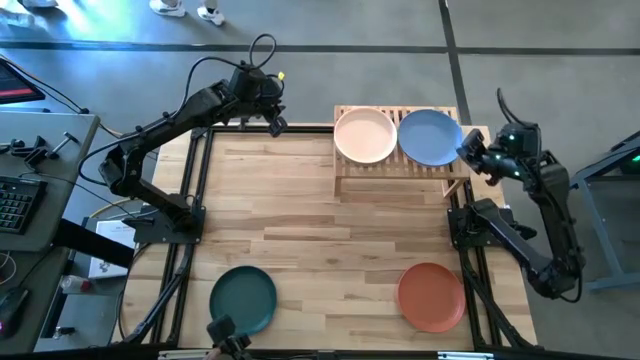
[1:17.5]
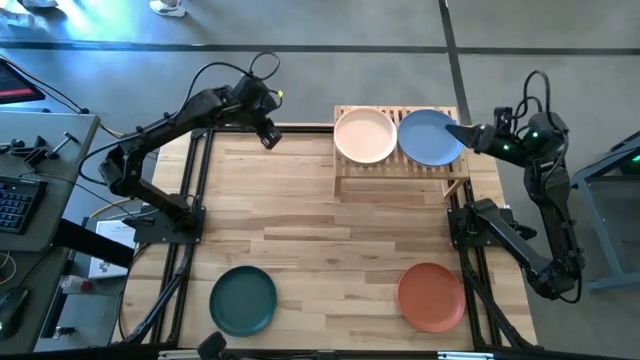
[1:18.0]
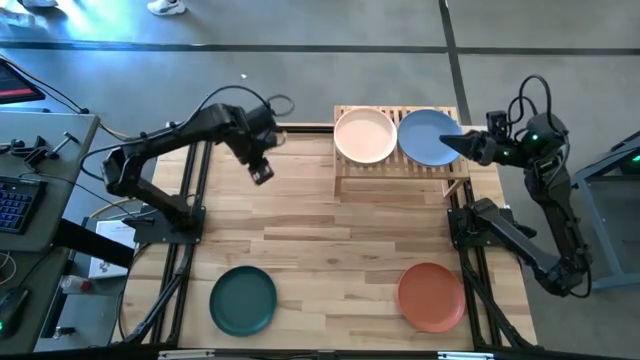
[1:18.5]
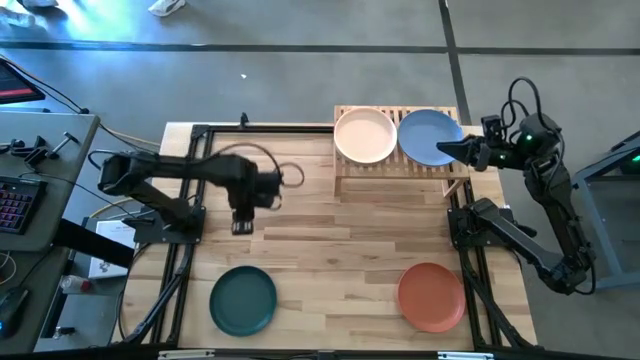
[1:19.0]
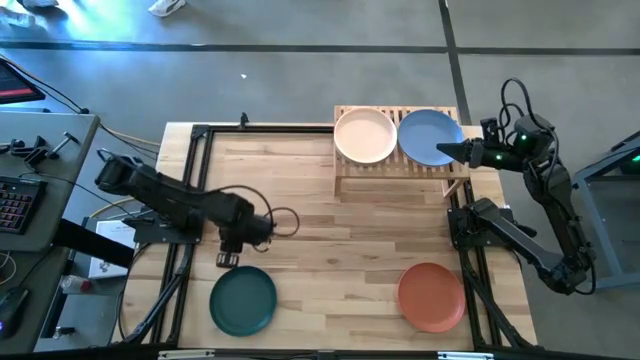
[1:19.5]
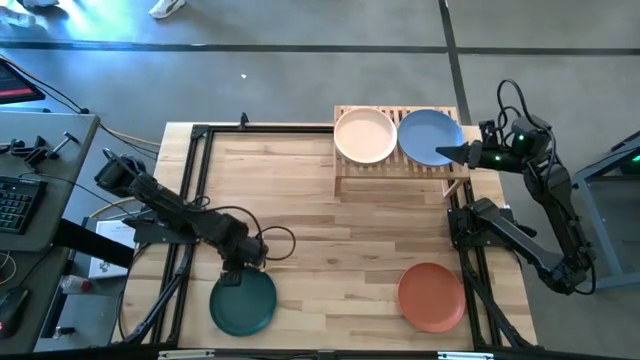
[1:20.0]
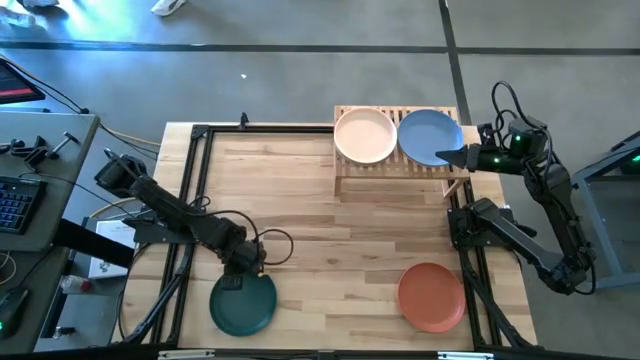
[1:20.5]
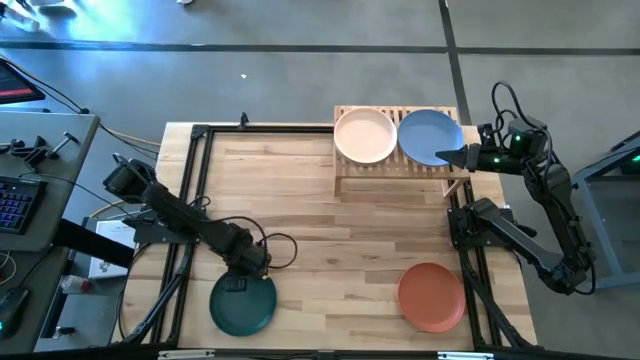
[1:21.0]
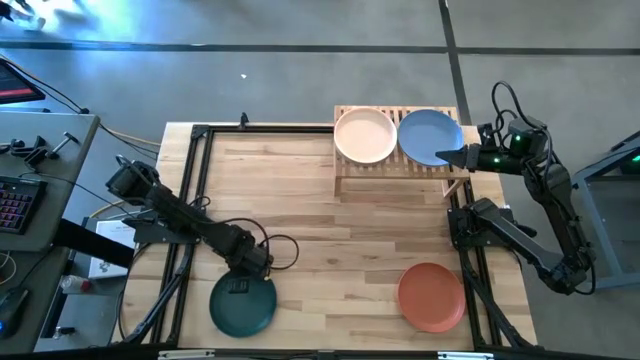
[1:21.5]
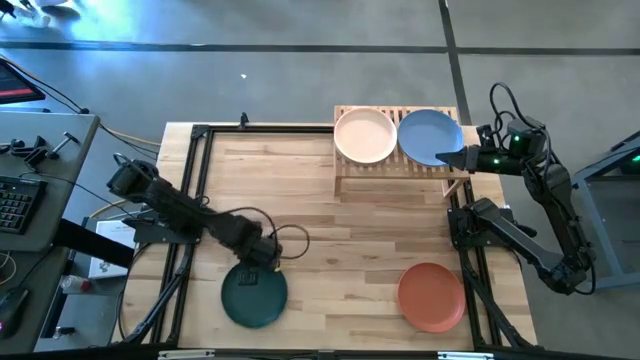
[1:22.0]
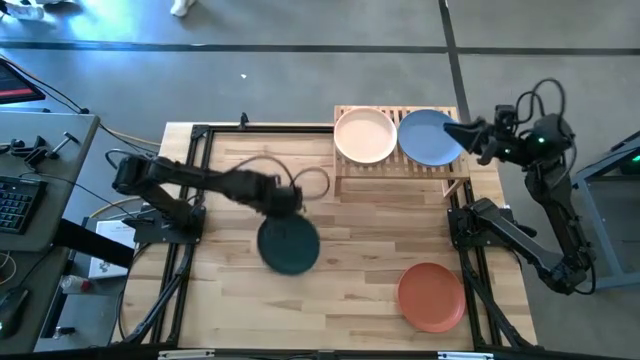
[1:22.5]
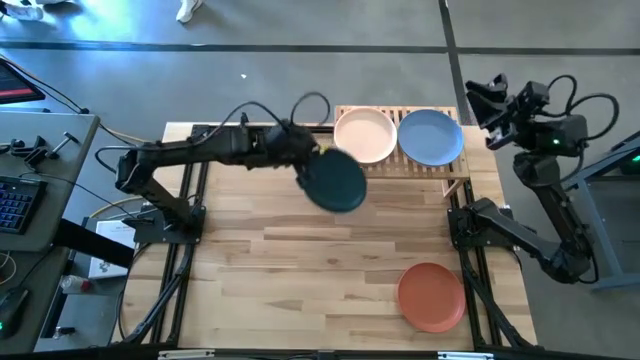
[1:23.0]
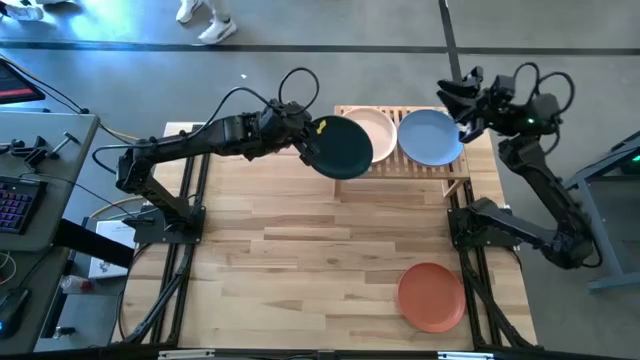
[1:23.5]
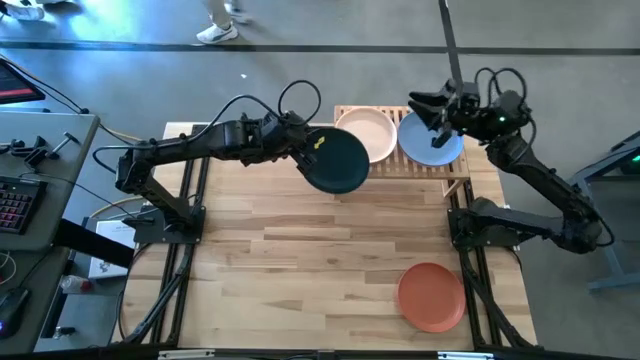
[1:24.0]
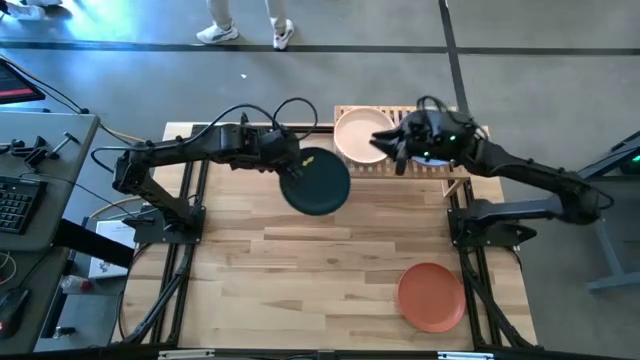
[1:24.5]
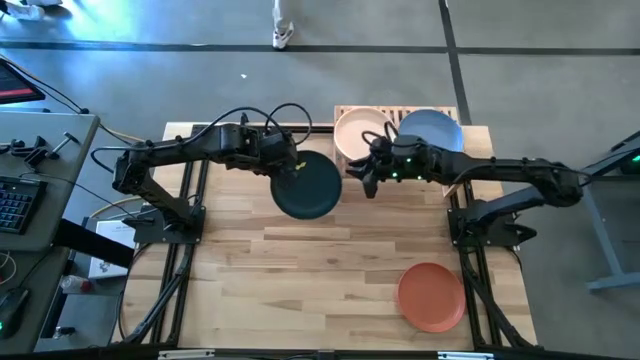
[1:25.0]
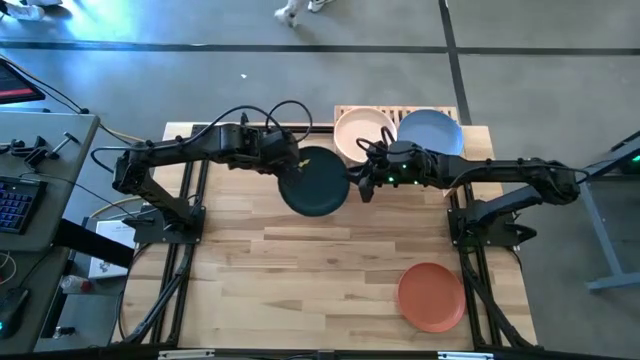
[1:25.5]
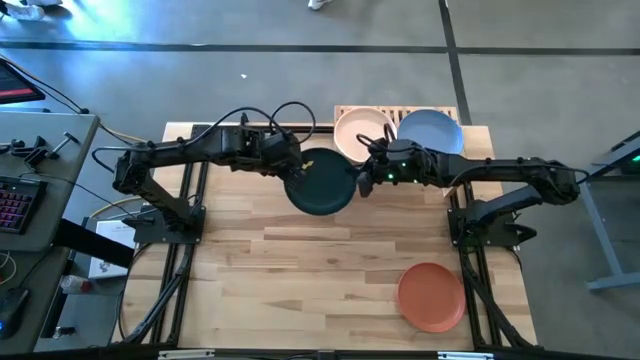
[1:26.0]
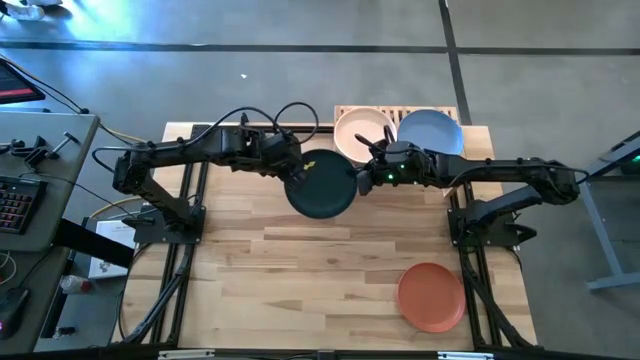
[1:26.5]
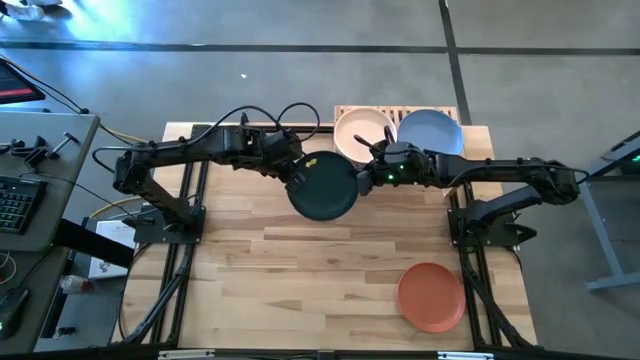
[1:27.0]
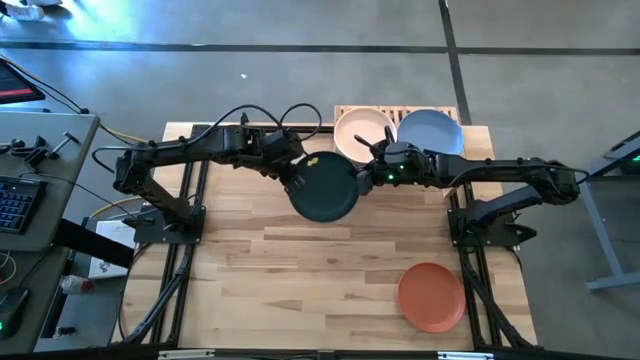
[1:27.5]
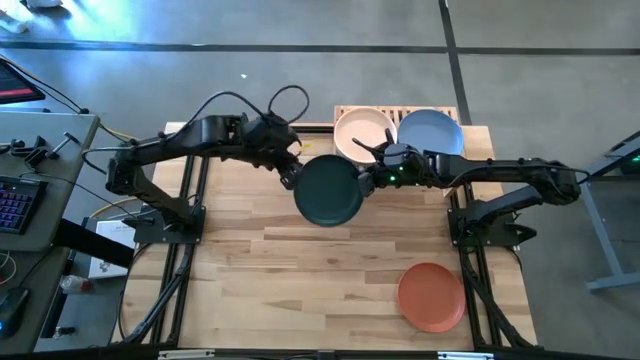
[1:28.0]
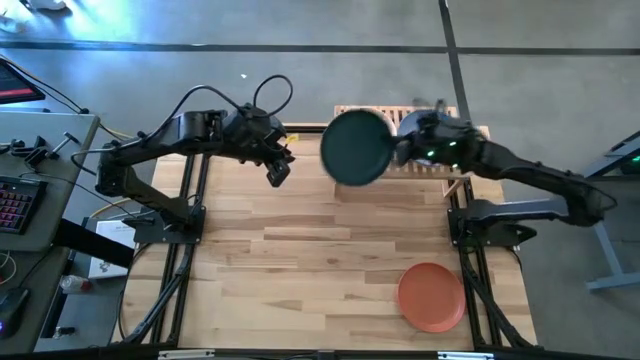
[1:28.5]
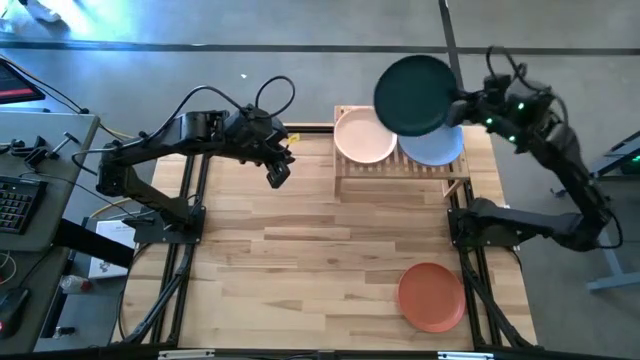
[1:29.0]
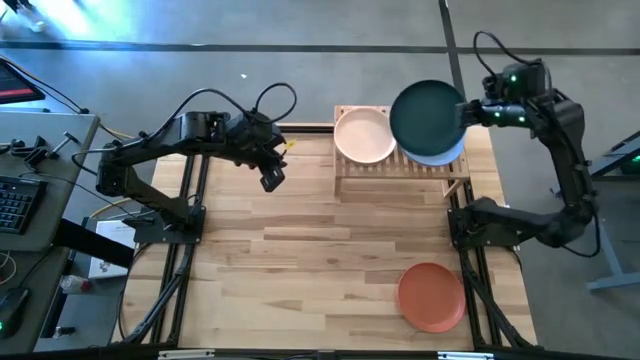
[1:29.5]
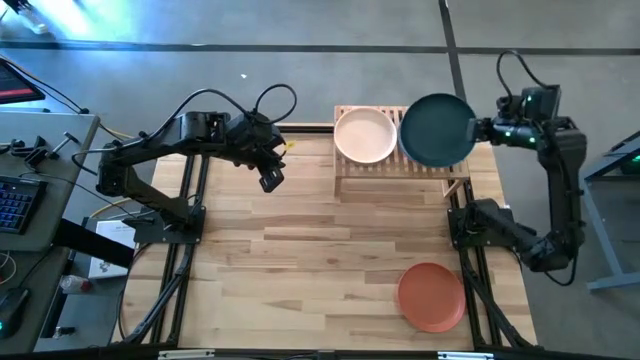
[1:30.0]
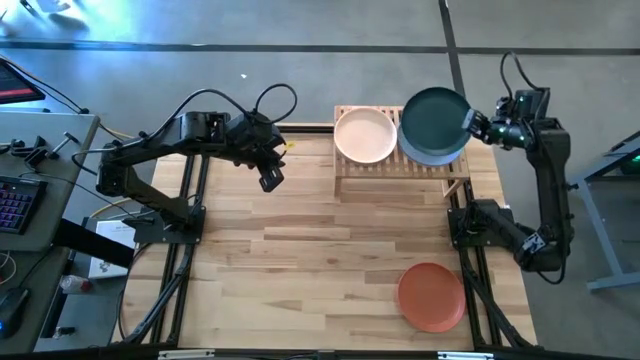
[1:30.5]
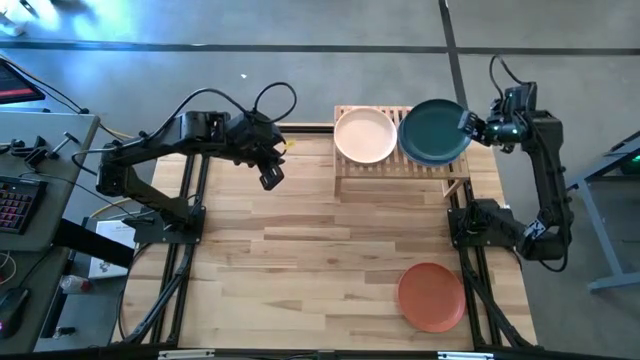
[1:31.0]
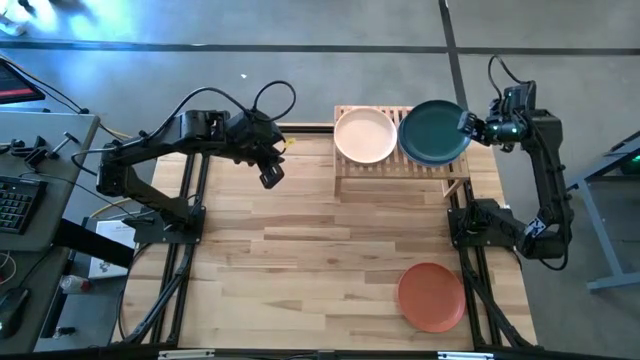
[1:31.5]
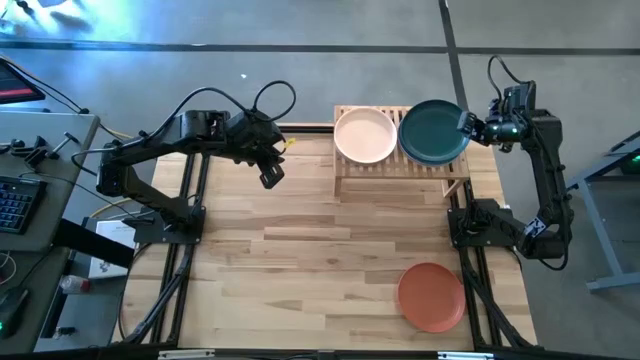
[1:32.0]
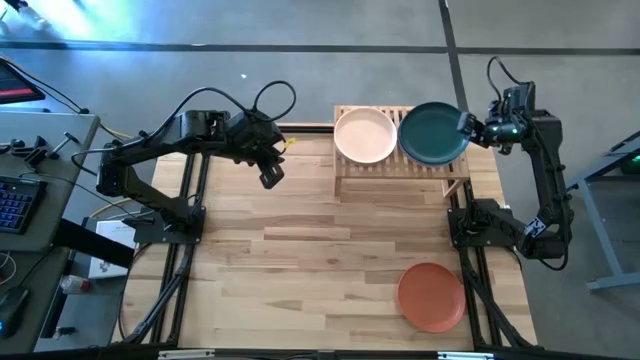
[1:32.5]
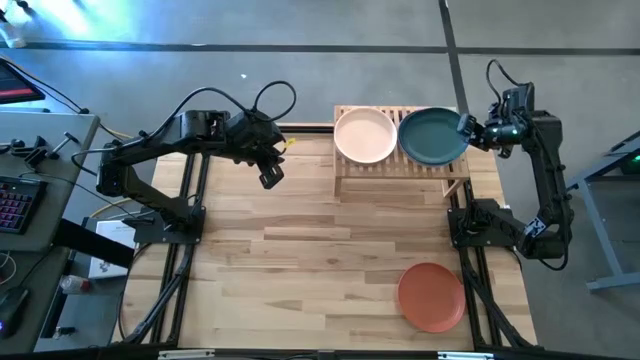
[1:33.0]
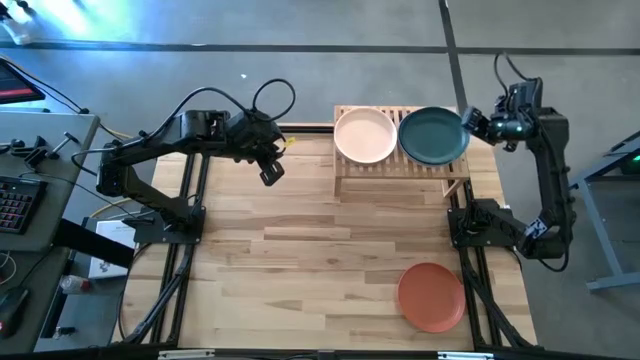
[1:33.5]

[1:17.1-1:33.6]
Task: Place and stack plates onto a shelf
Stack the green plate on top of the blue plate on the shelf

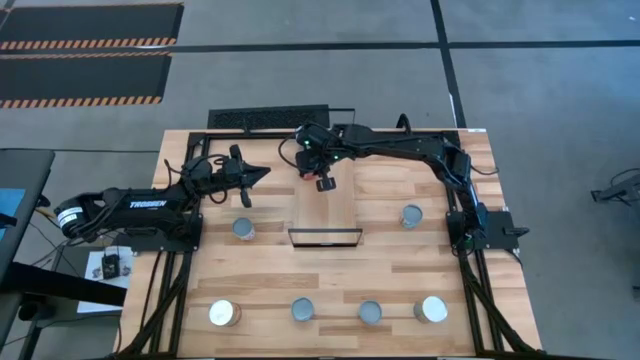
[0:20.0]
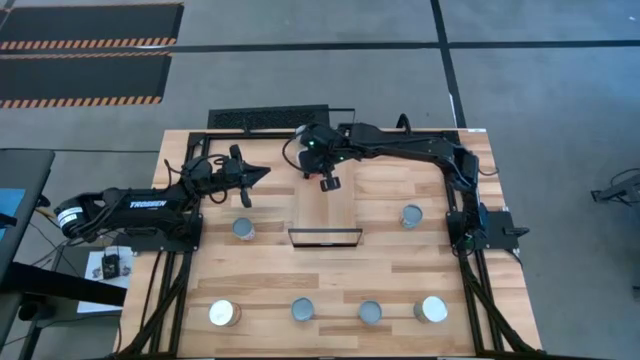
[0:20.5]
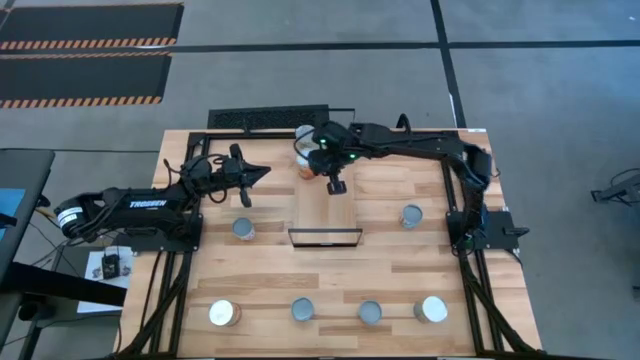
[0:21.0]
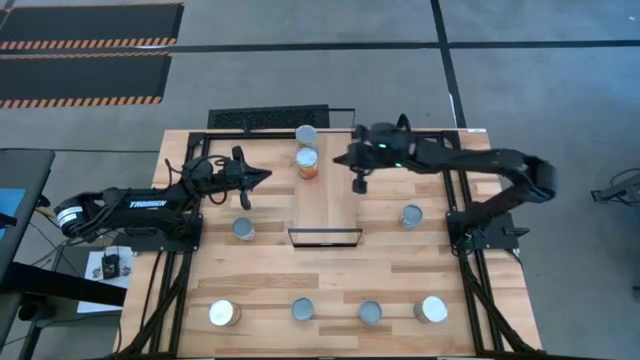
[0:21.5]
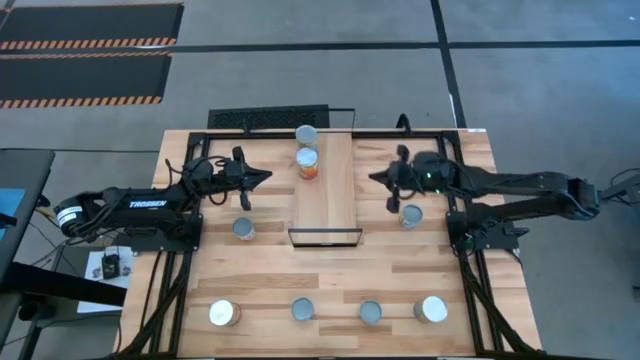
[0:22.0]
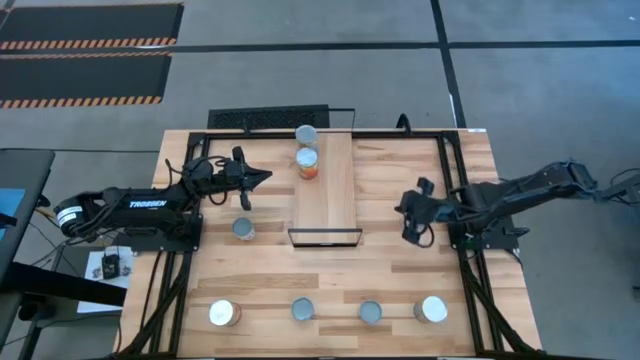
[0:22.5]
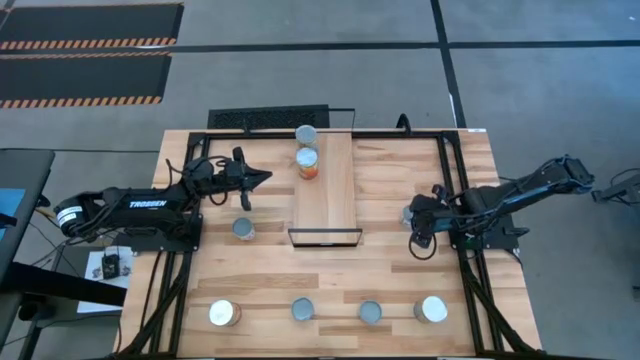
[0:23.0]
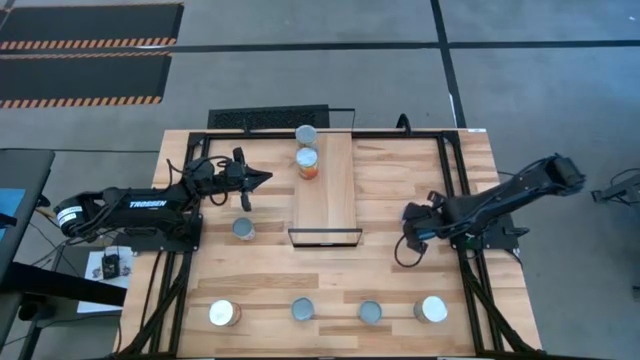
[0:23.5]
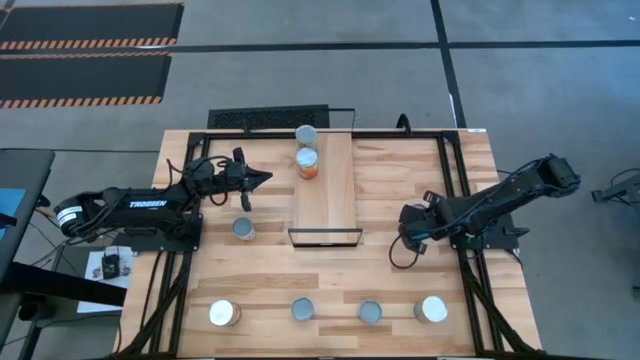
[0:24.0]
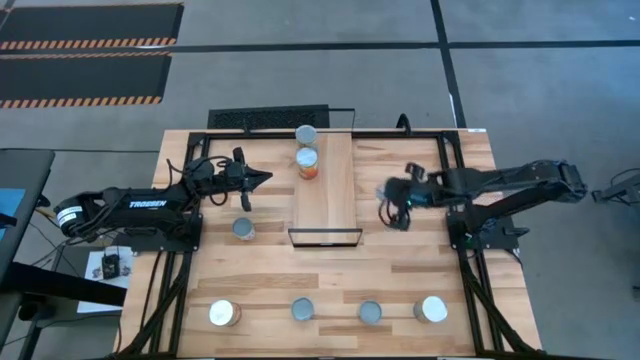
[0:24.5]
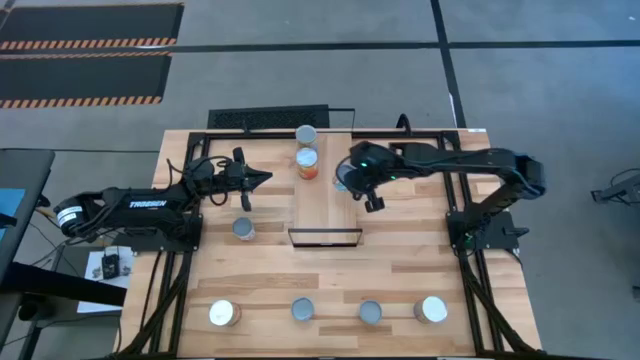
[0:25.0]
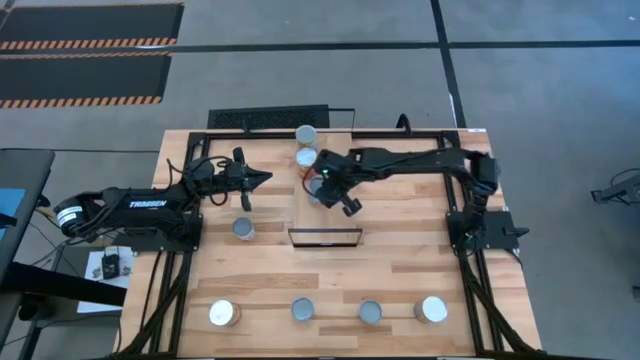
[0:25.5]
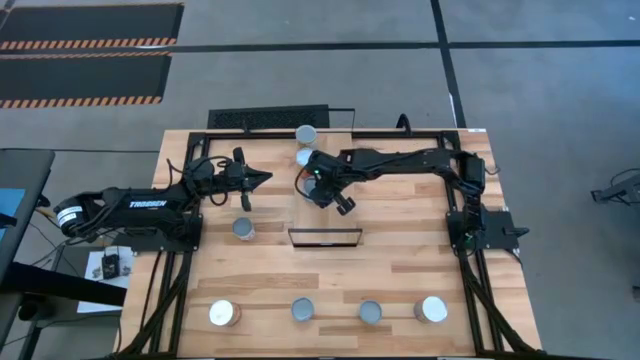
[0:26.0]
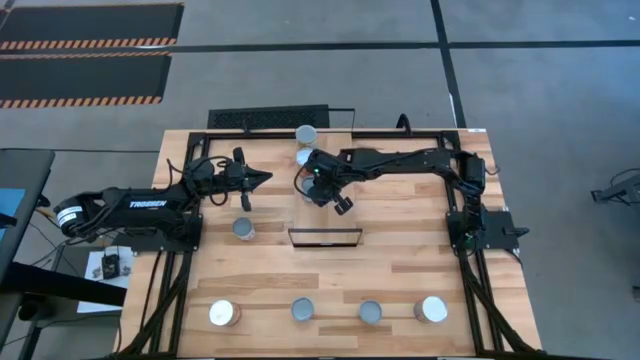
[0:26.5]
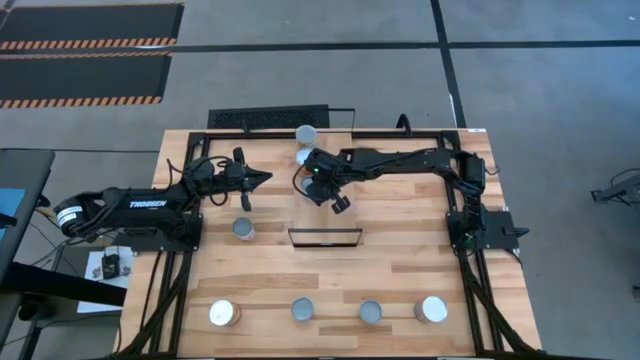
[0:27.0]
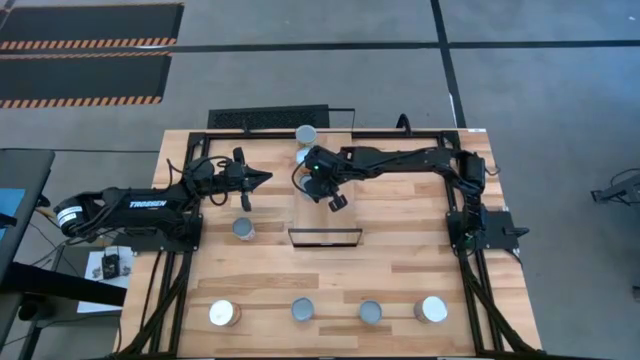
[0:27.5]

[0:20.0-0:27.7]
Task: Pick and place cans onto a shelf
Put the canned carrot on the shelf
